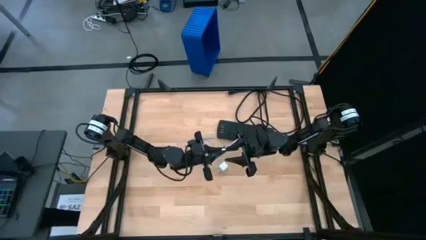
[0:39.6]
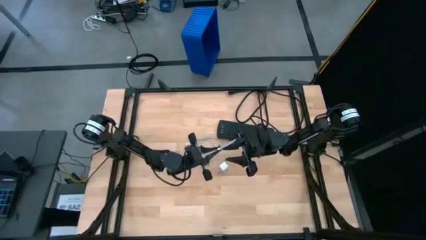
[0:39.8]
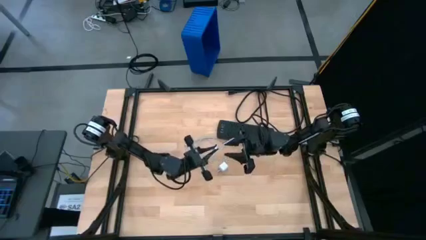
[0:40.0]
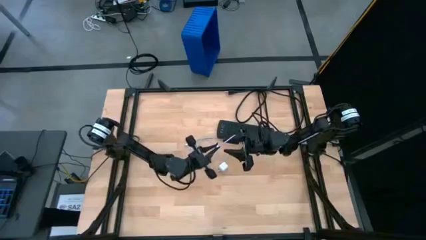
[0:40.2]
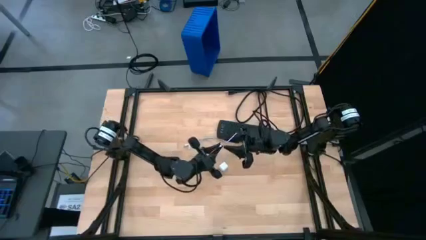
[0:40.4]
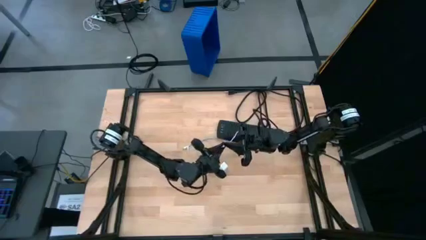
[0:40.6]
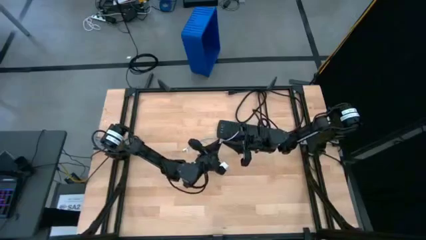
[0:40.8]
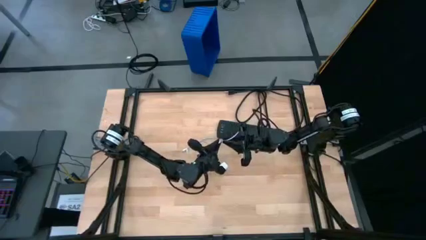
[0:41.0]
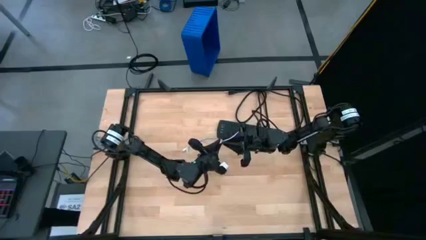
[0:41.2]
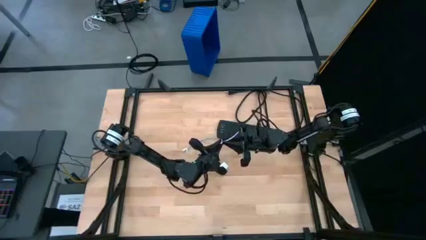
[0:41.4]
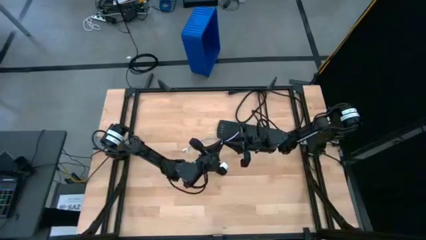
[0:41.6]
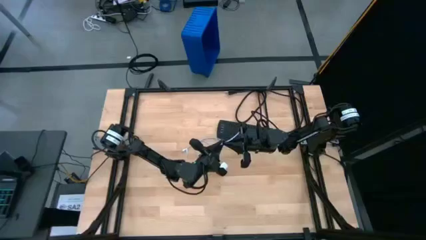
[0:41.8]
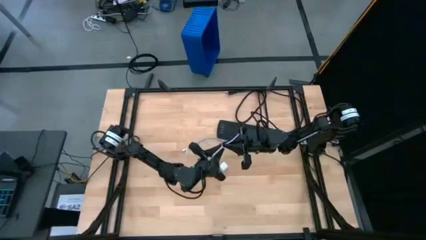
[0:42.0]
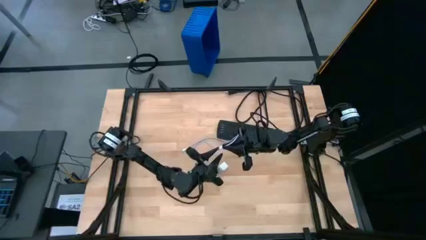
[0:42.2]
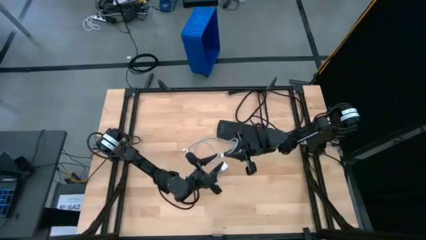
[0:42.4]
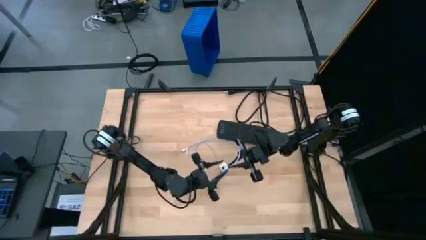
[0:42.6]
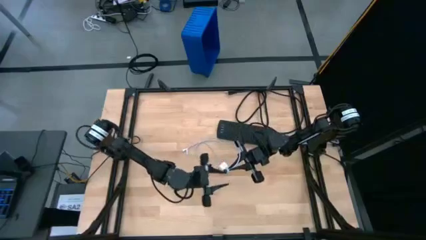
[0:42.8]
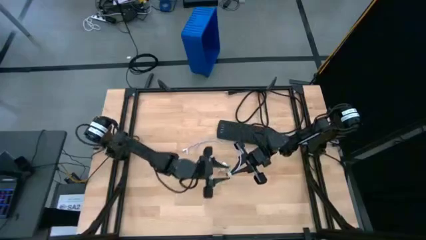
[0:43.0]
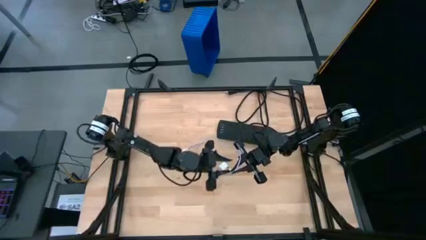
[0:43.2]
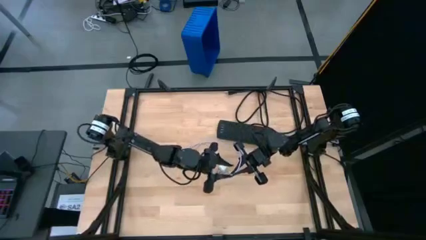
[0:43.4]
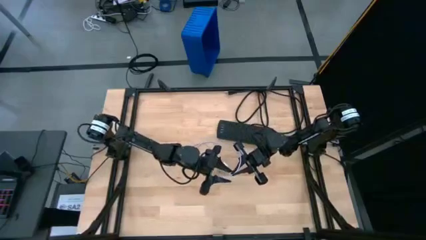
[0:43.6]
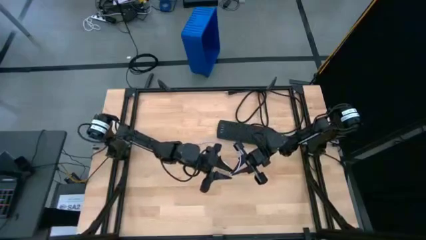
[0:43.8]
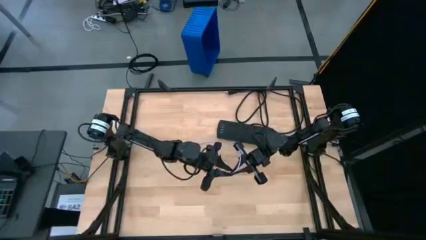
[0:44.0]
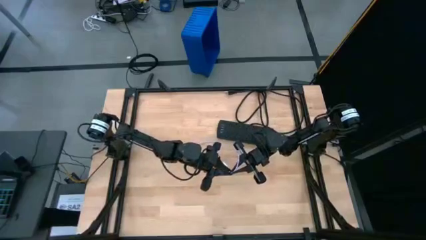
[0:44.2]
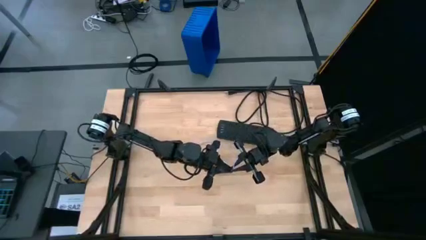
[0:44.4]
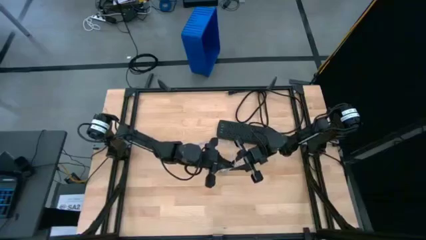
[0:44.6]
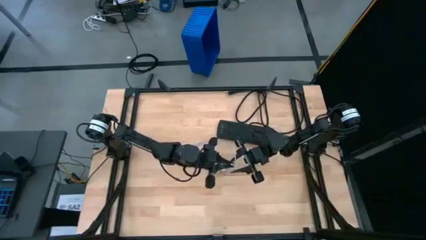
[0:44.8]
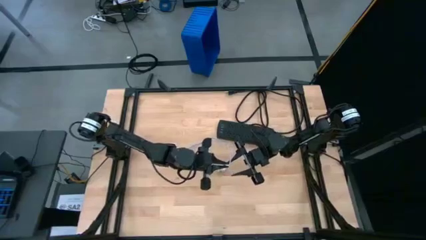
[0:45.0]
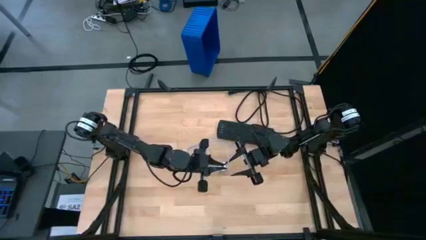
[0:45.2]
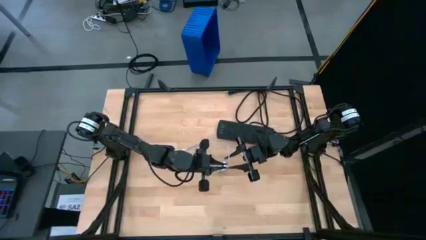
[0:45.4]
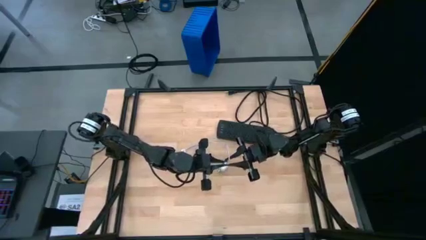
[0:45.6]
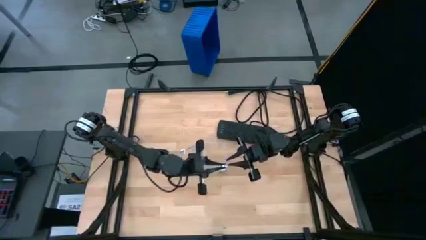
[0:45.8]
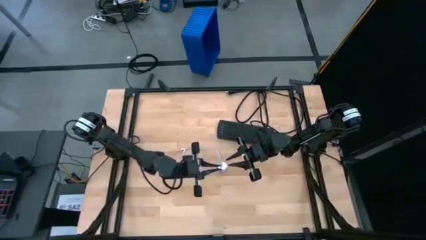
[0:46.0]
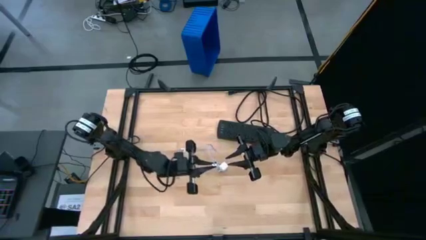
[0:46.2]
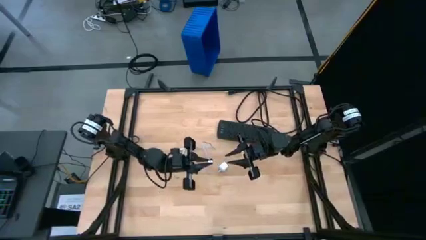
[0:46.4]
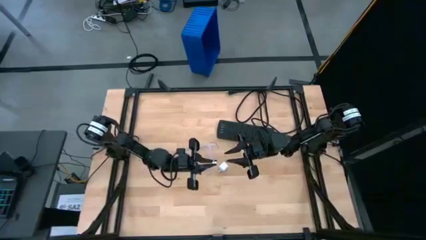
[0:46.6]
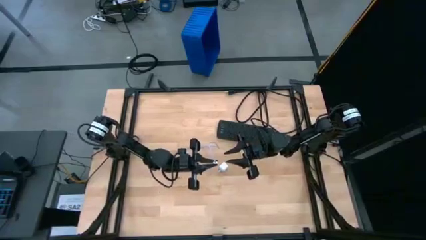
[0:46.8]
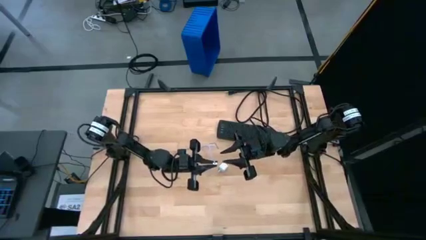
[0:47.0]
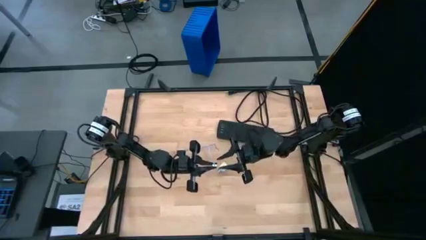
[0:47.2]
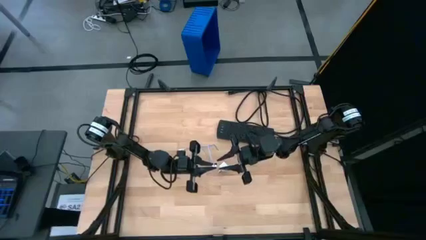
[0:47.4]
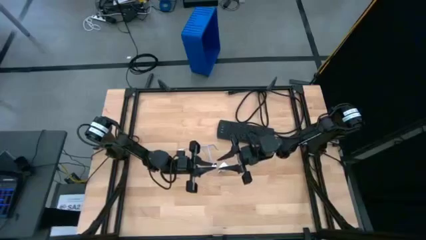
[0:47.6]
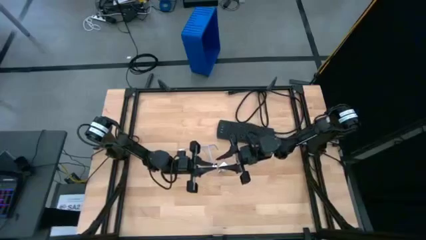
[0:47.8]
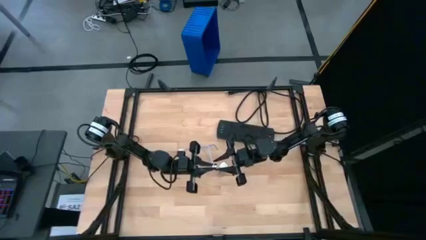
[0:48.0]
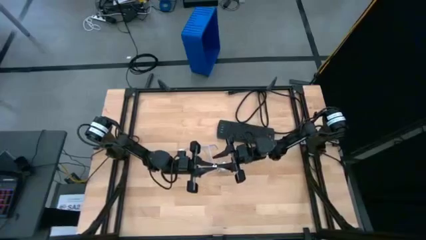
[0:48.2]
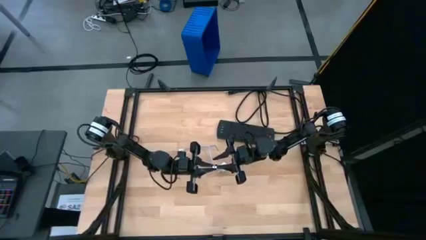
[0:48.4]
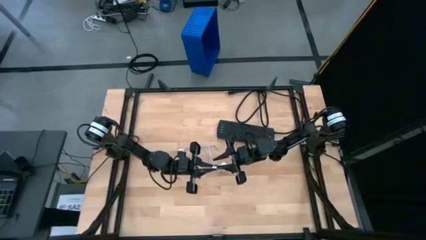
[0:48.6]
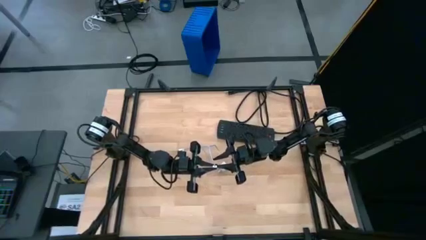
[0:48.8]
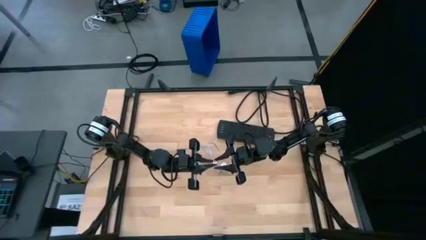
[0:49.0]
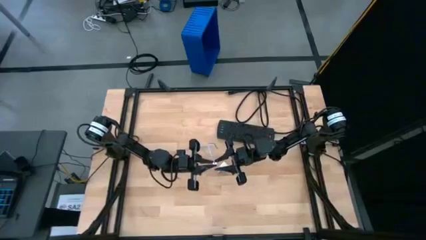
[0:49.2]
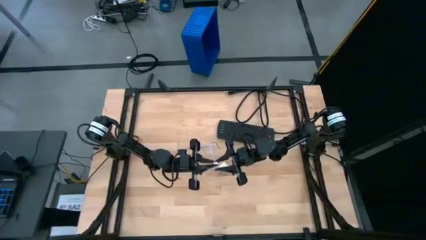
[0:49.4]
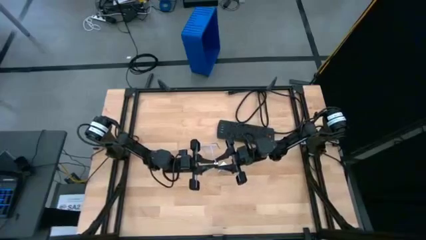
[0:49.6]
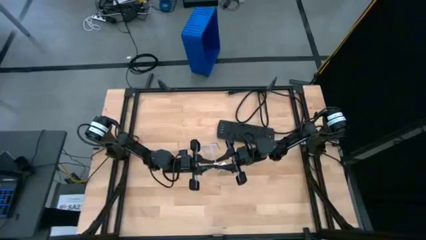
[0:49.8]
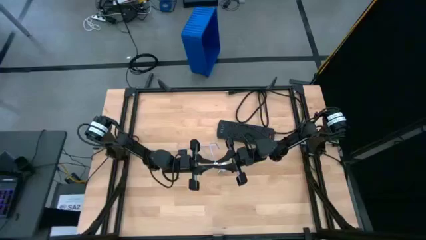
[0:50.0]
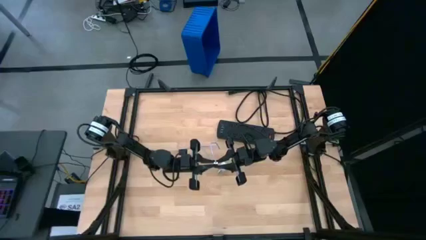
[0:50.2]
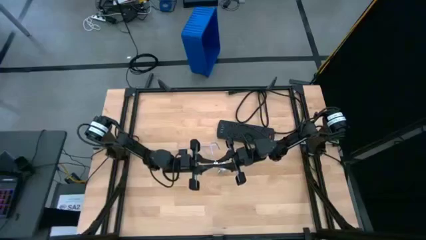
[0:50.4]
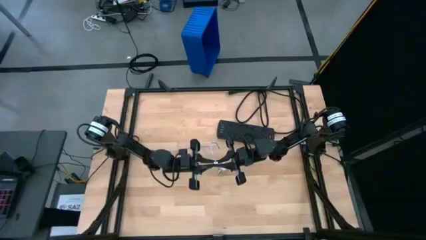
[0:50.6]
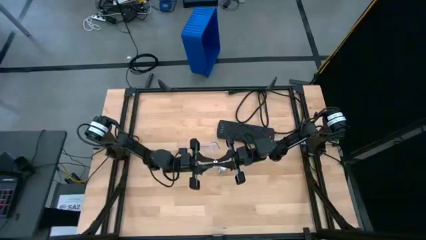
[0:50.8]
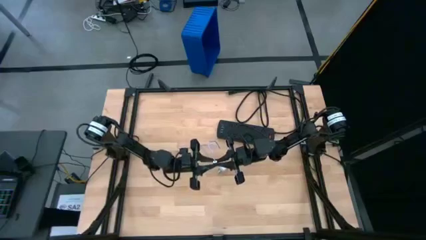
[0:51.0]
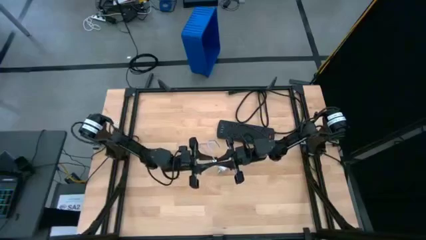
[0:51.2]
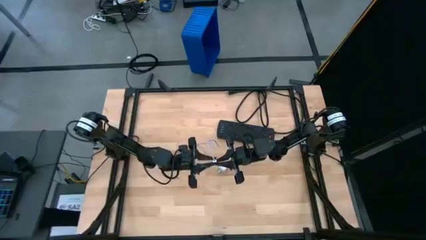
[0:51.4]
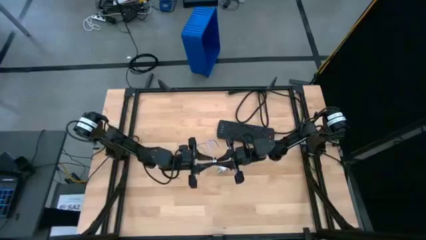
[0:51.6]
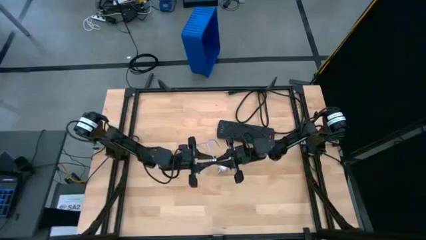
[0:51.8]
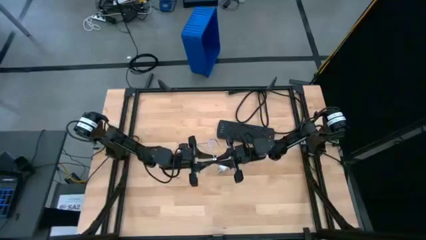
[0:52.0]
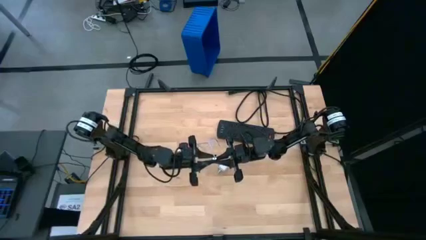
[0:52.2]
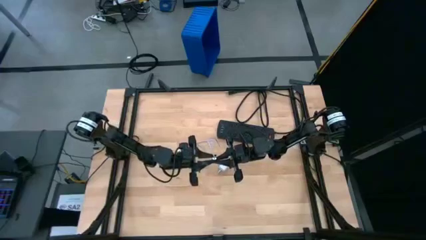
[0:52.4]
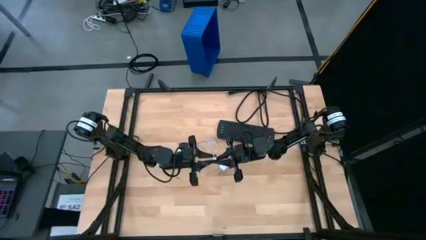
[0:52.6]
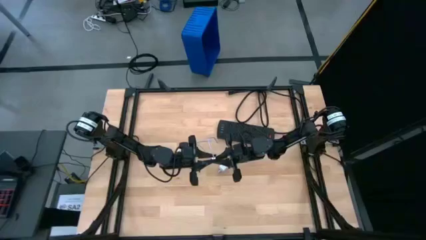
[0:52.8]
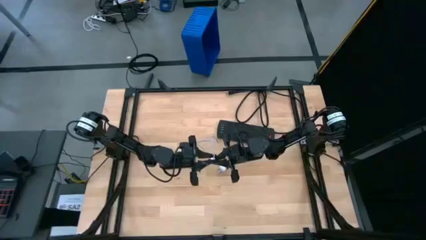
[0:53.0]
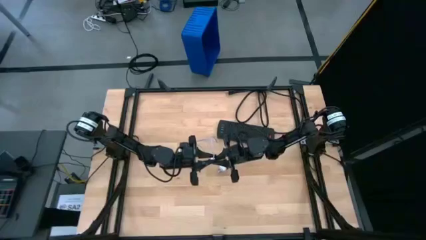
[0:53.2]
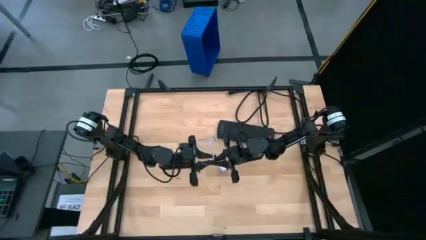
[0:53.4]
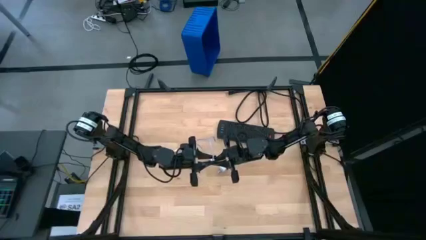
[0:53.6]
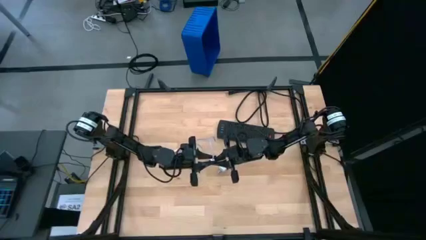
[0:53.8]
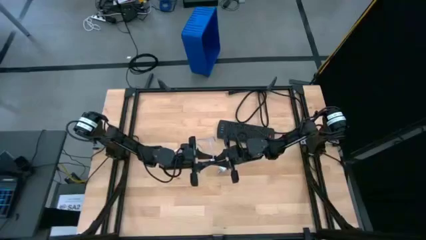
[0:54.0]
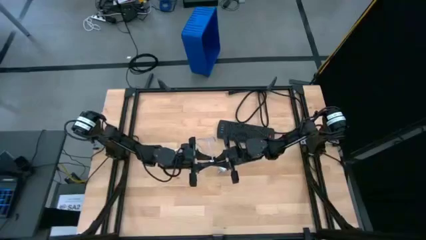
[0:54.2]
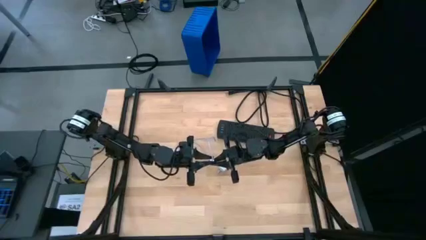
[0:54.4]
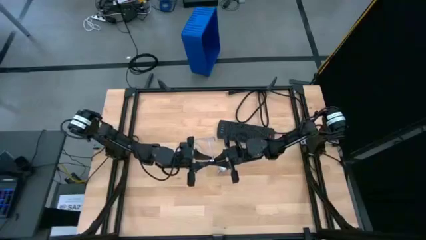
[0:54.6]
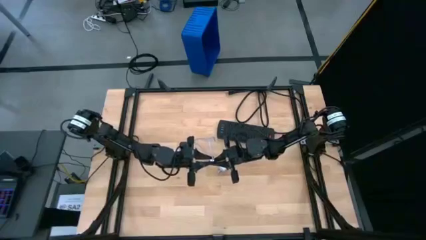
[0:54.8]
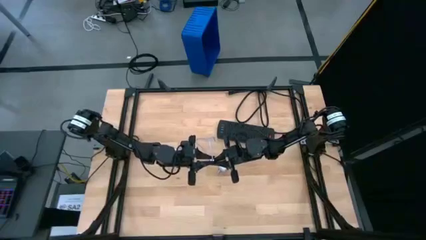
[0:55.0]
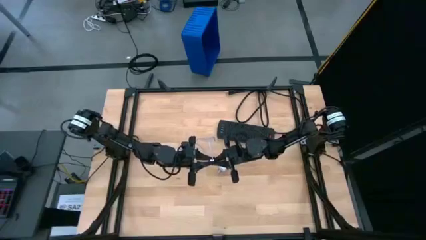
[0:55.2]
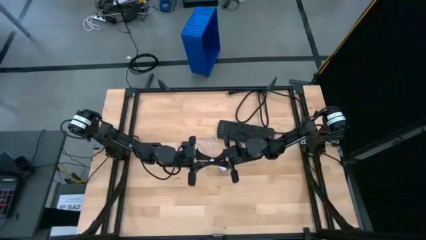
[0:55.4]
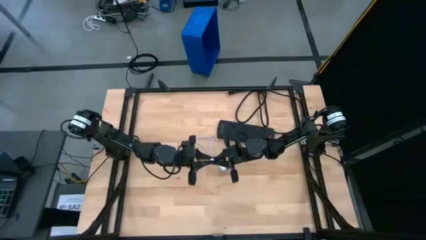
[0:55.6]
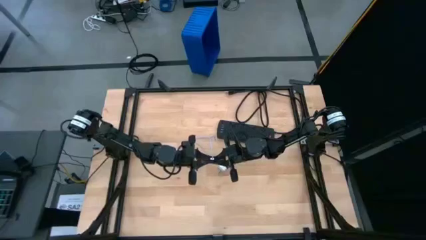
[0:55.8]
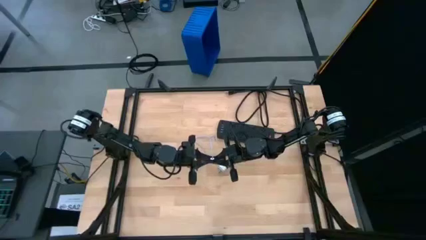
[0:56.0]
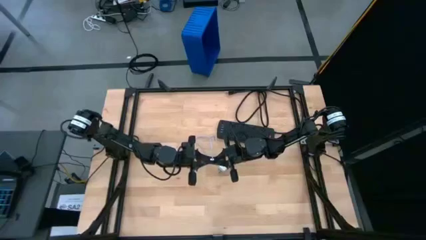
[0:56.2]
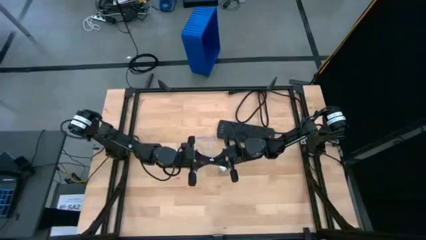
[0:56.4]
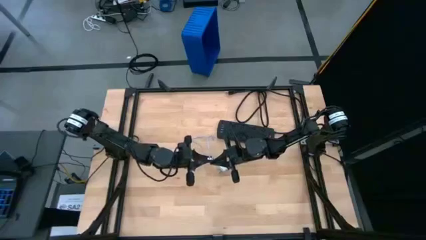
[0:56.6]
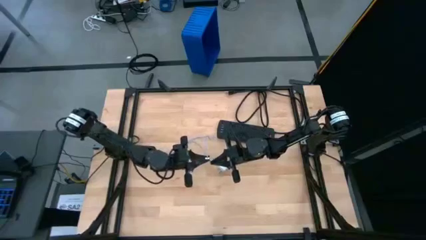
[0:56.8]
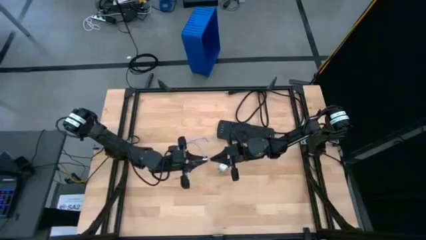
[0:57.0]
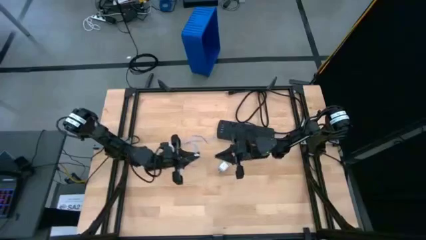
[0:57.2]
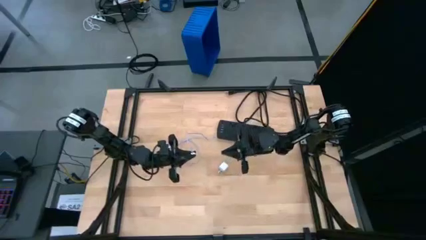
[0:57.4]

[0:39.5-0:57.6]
Task: Insert USB
Insert the white charger cable into the white charger adapter
